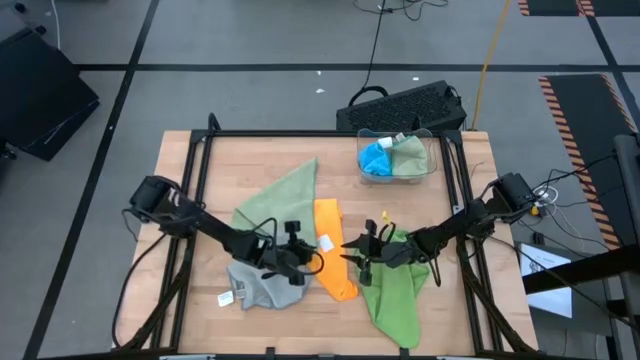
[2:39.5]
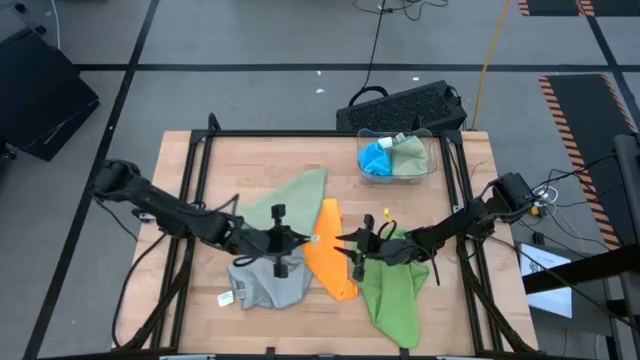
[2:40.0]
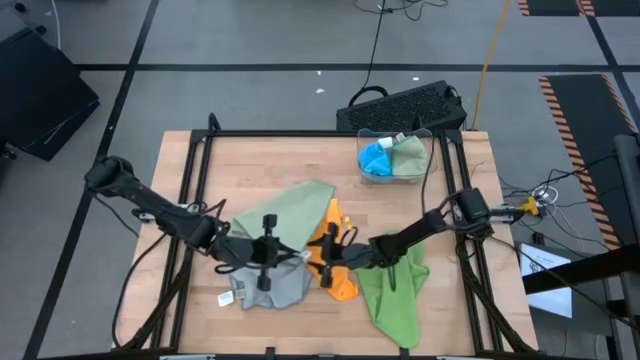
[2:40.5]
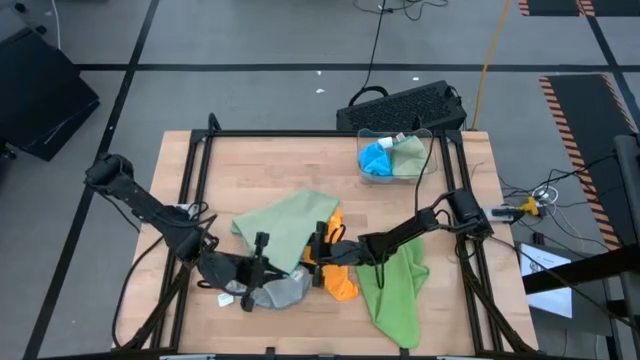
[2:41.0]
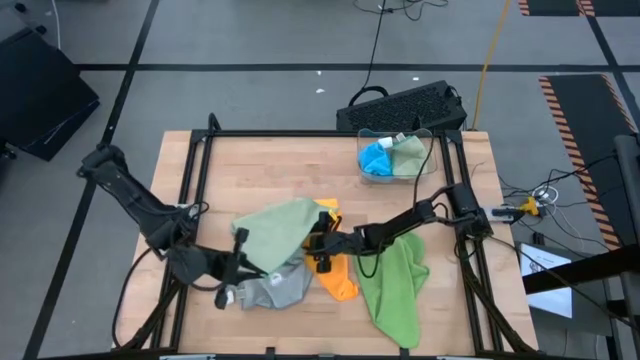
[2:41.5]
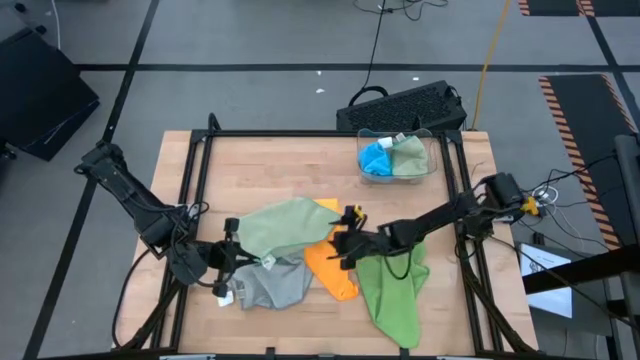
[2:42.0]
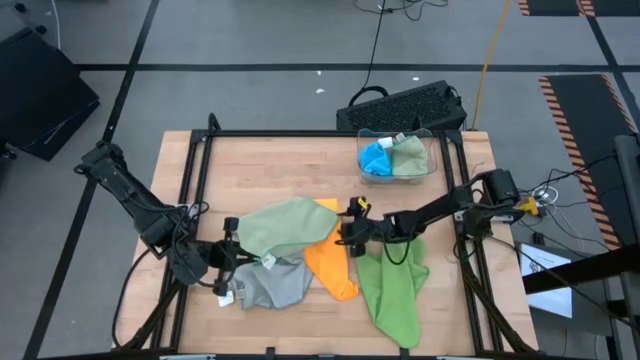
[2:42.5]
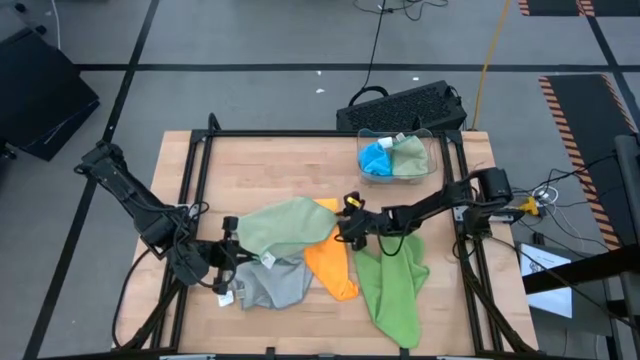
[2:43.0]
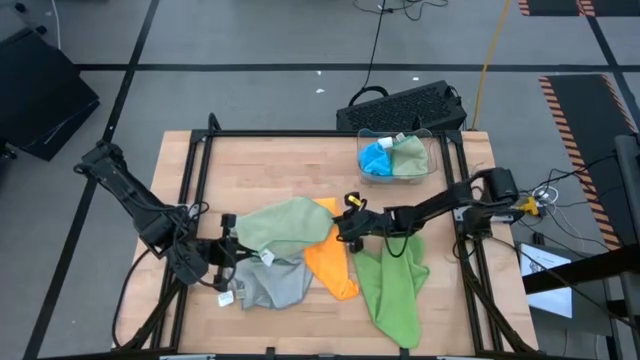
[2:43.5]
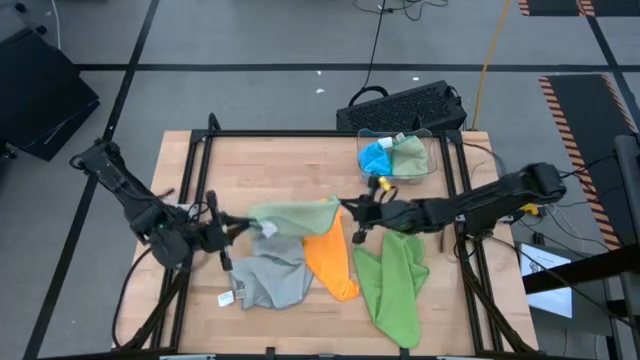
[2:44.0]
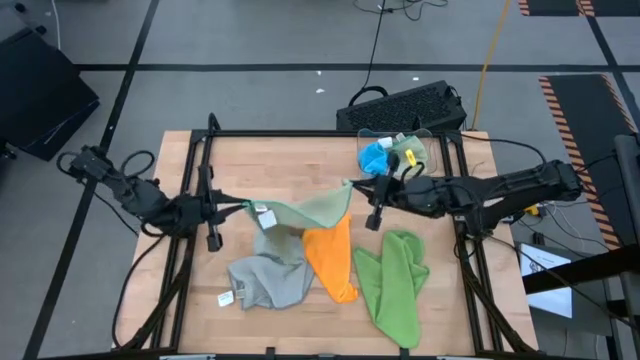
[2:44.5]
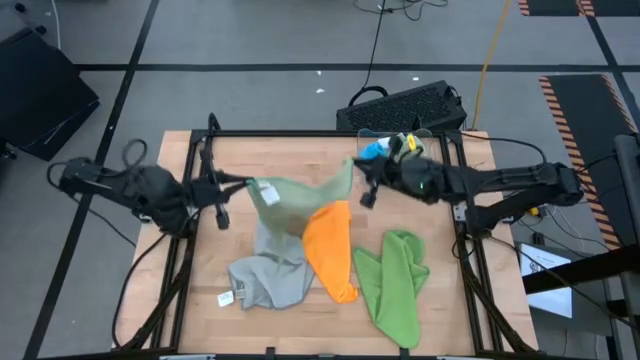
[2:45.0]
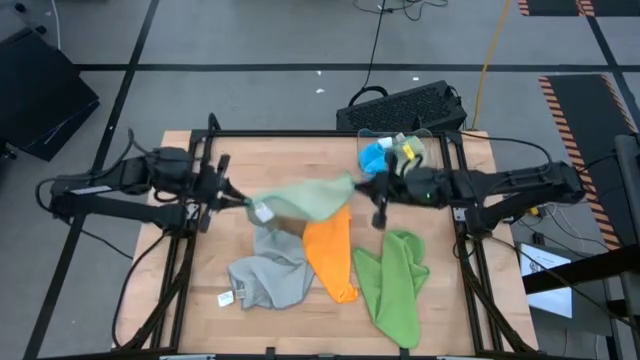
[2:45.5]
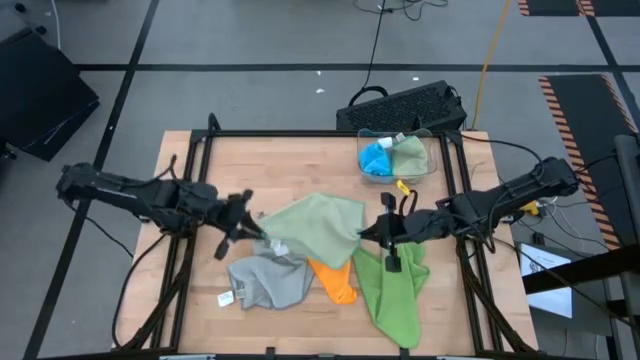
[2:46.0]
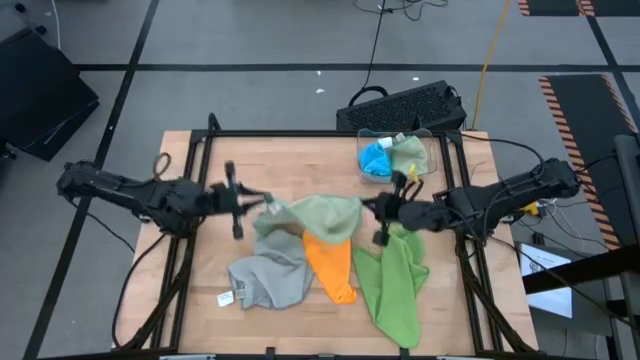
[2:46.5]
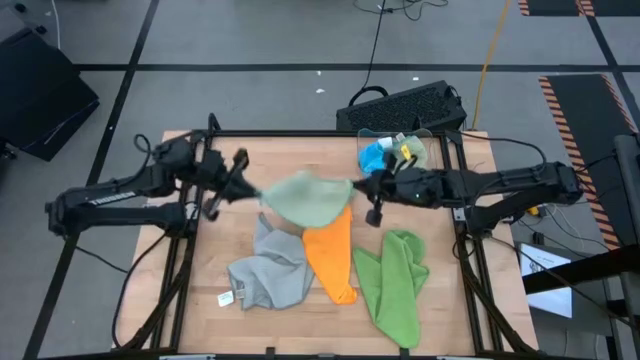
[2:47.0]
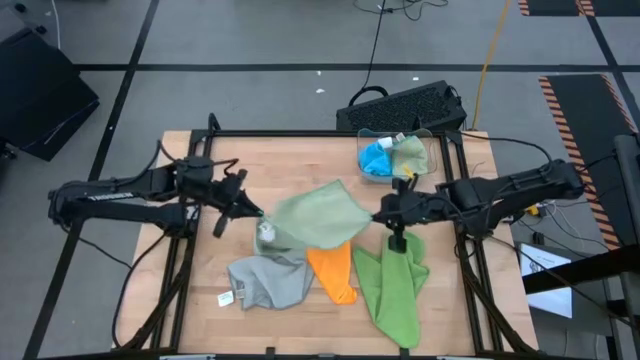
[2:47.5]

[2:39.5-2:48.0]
Task: Fold microfiber towels
Fold the light green microfiber towel

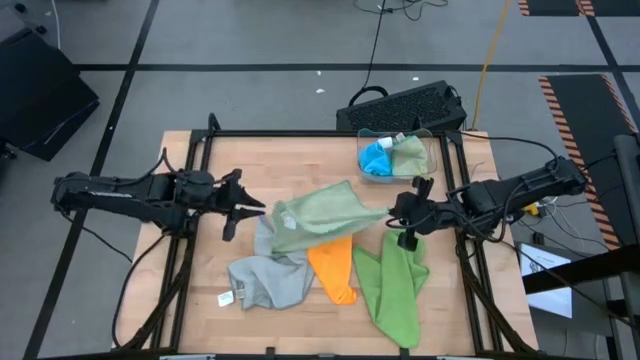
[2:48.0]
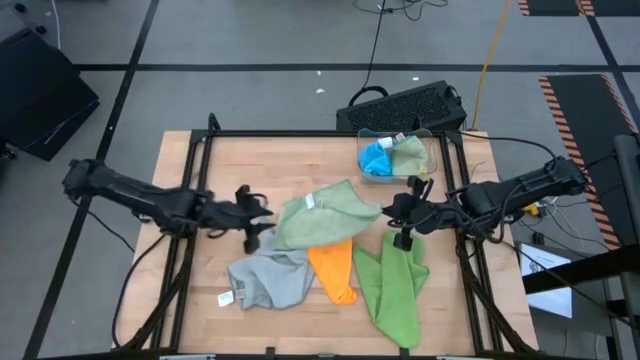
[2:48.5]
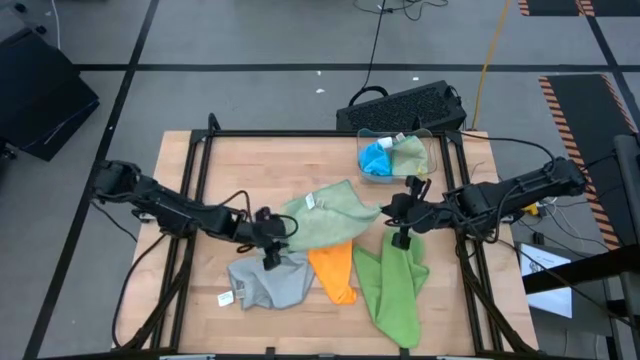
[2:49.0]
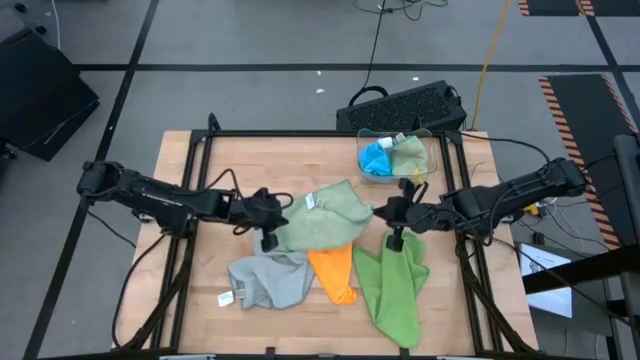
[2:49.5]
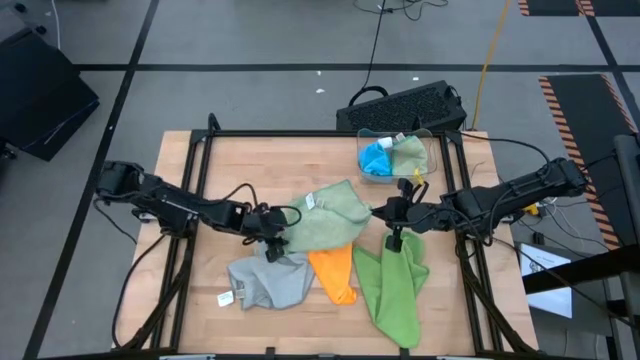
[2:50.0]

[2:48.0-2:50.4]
Fold the light green microfiber towel

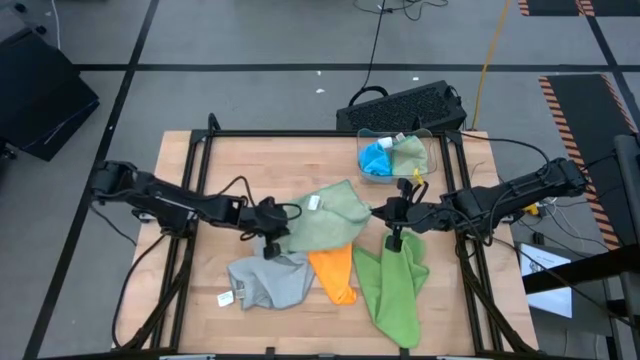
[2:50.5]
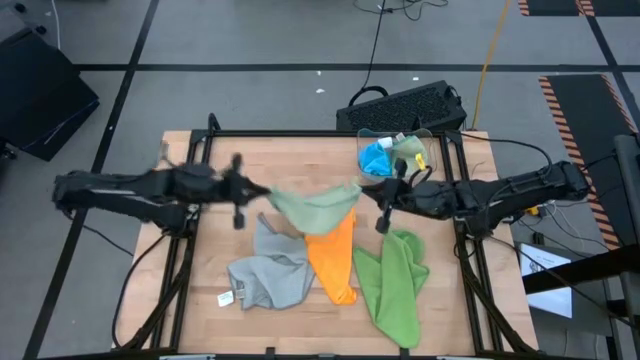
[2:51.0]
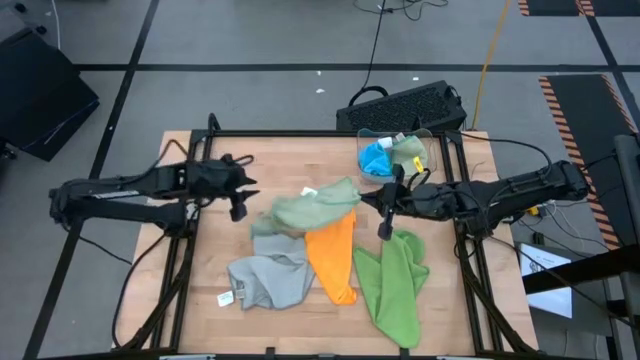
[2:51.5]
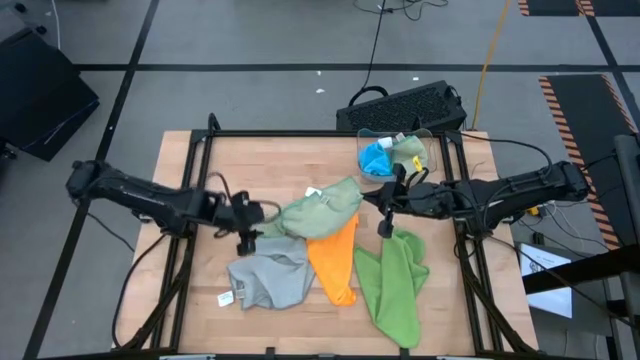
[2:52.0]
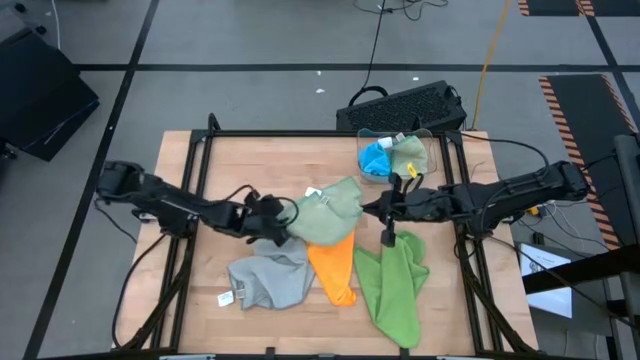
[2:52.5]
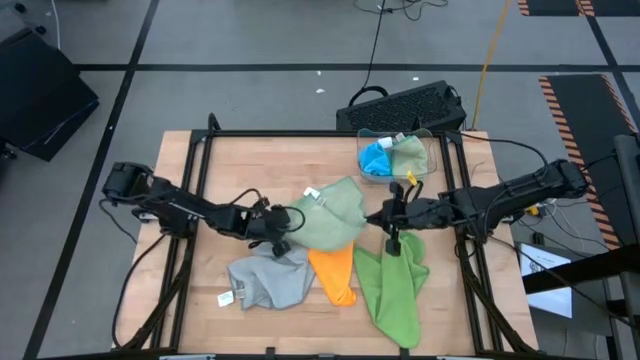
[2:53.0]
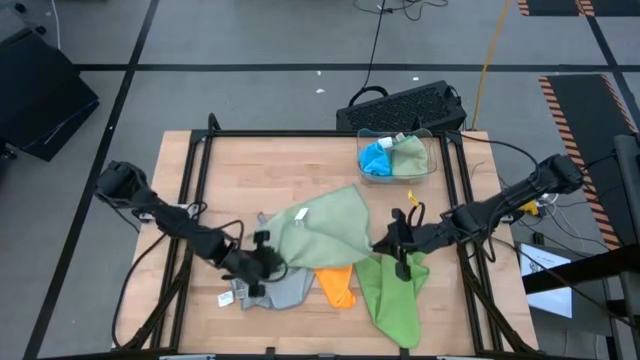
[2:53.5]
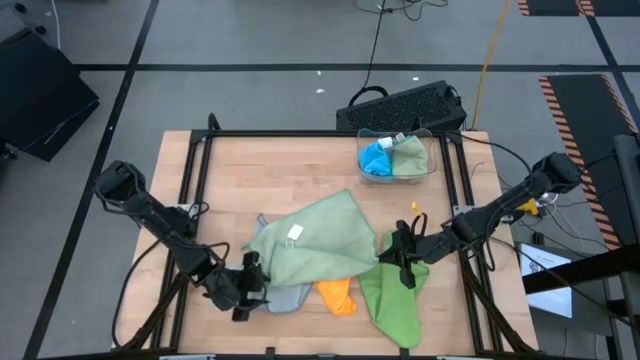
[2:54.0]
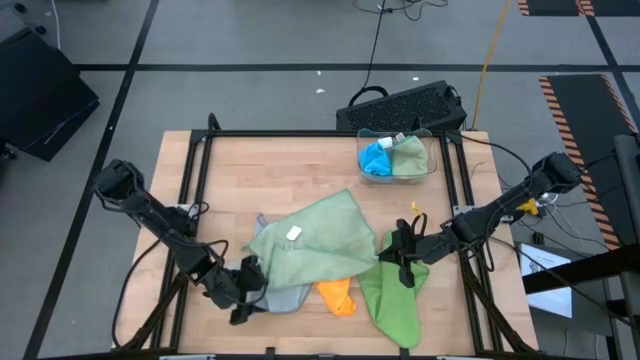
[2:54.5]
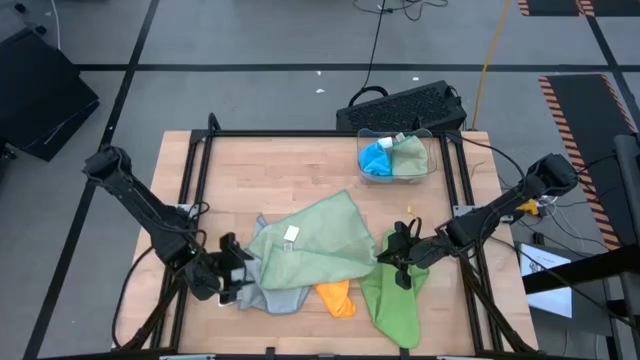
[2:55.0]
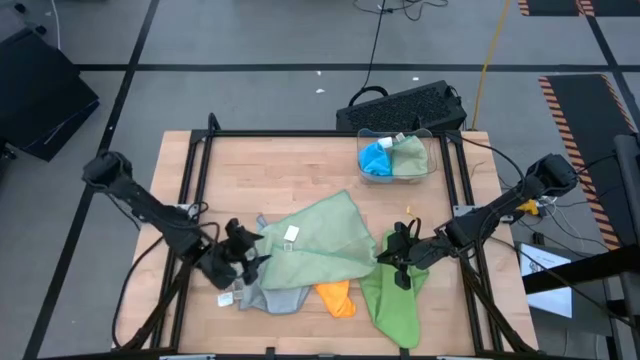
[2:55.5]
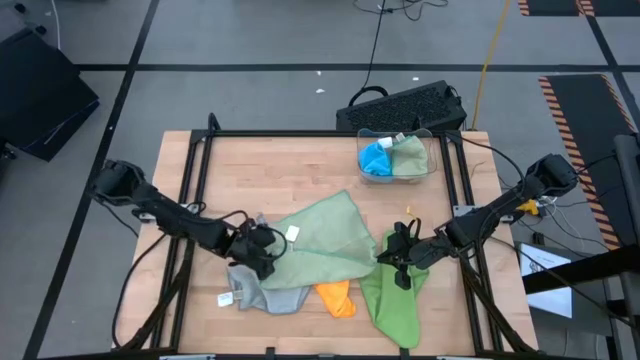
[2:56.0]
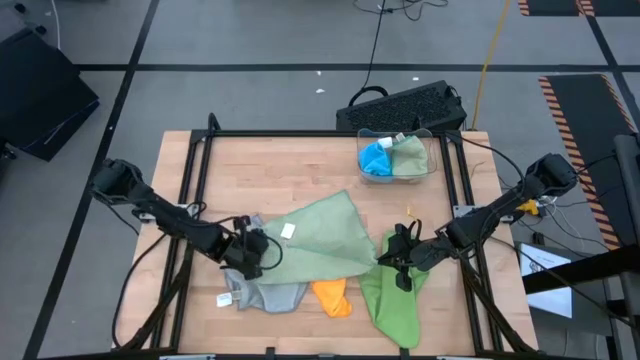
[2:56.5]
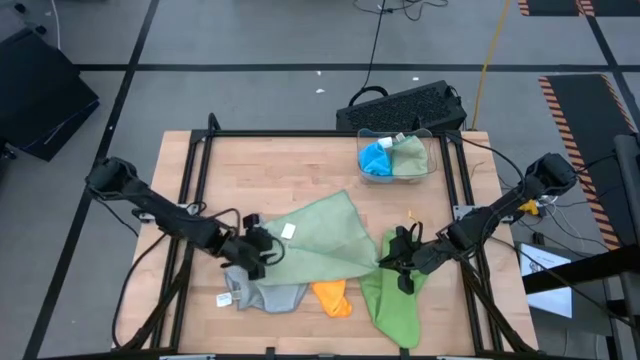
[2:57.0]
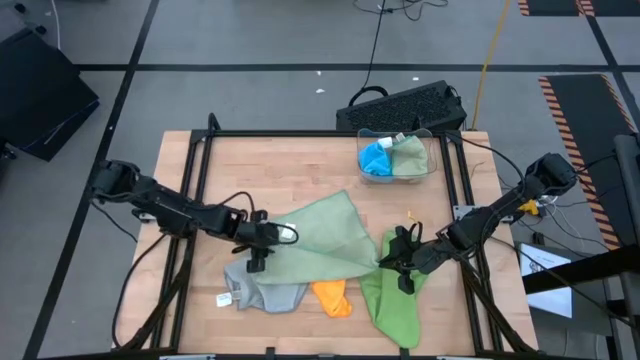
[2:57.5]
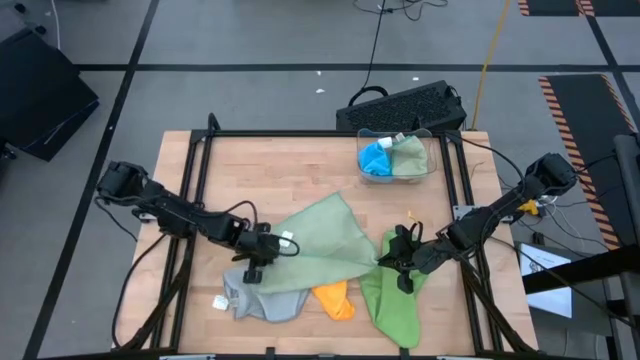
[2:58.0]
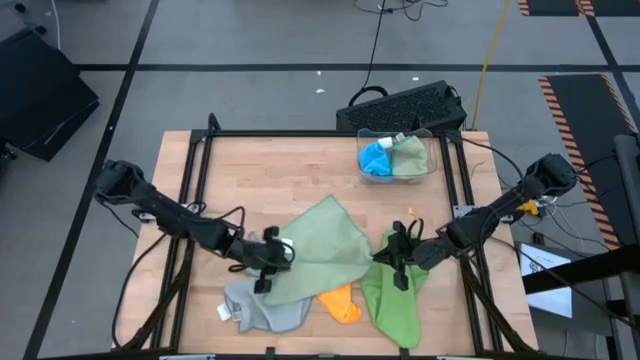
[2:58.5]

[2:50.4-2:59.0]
Fold the light green microfiber towel

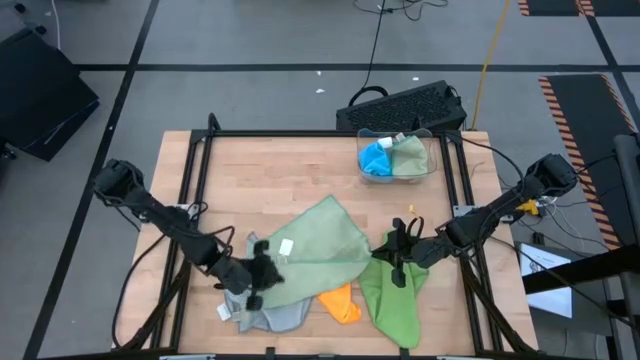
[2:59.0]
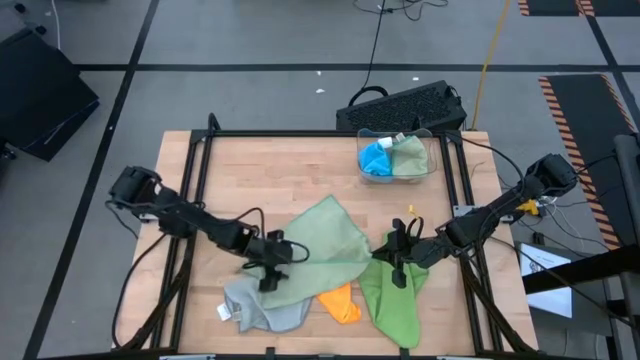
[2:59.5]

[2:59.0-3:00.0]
Fold the light green microfiber towel
